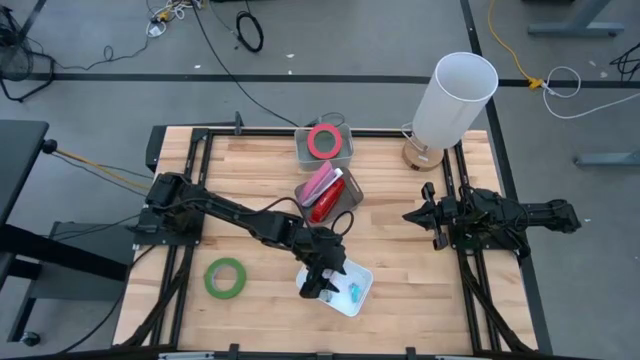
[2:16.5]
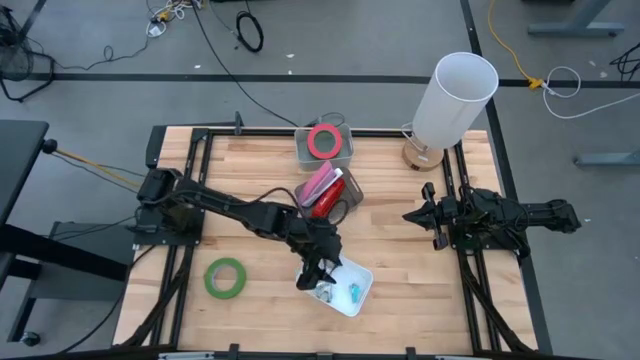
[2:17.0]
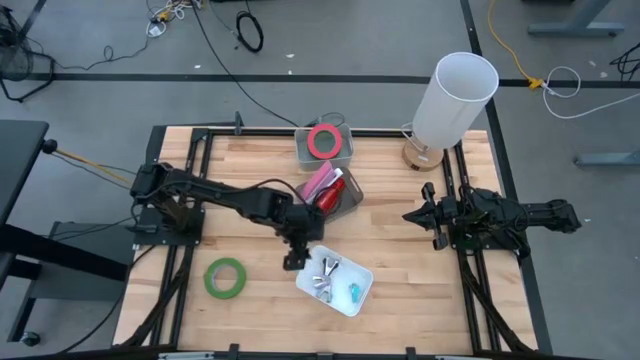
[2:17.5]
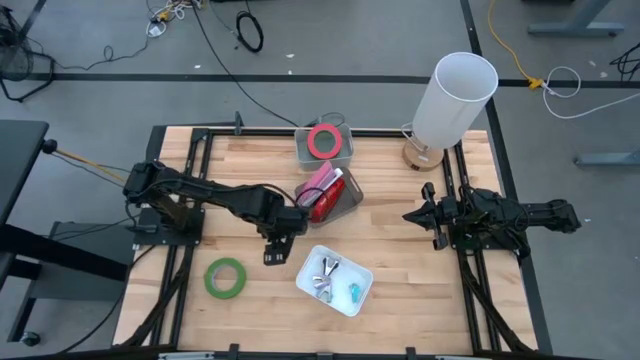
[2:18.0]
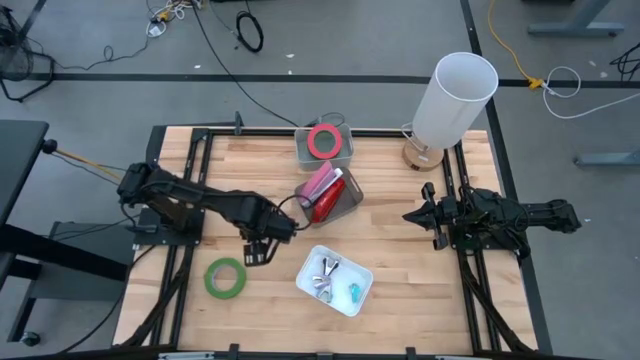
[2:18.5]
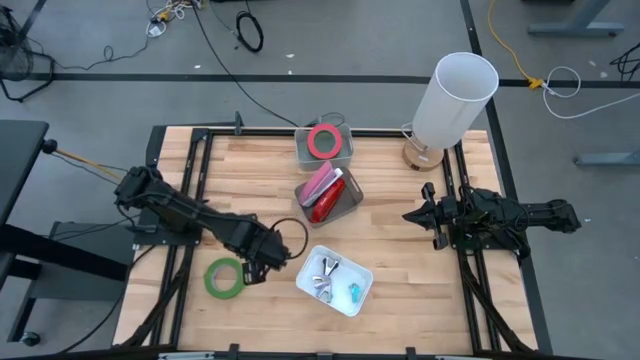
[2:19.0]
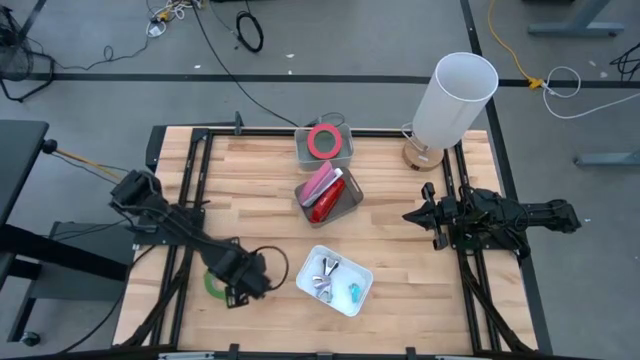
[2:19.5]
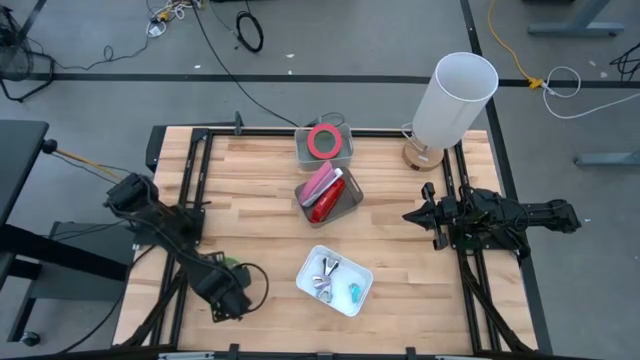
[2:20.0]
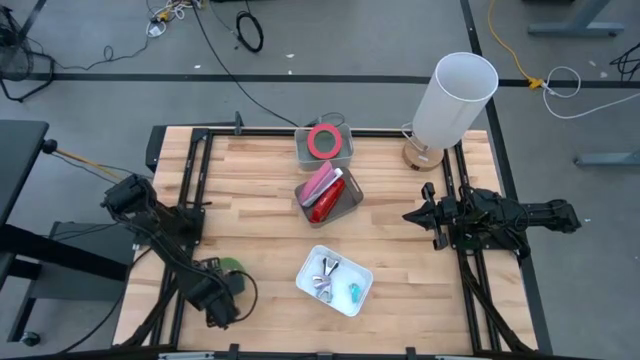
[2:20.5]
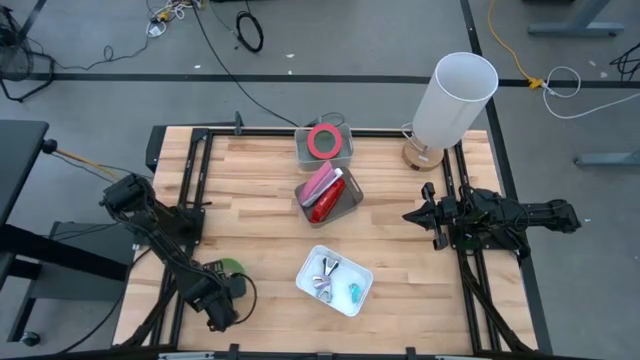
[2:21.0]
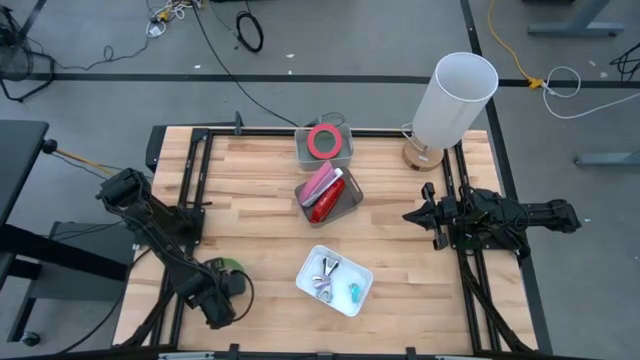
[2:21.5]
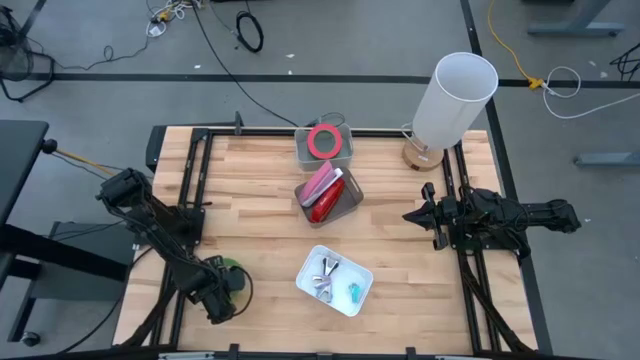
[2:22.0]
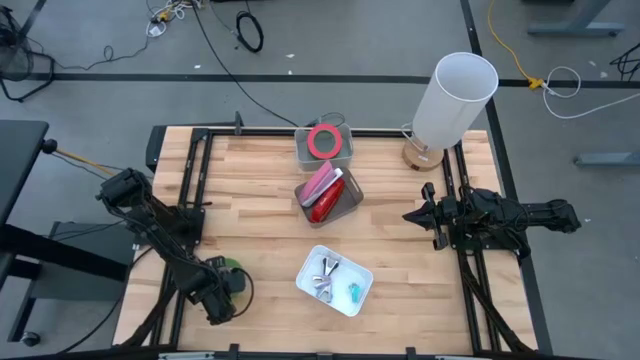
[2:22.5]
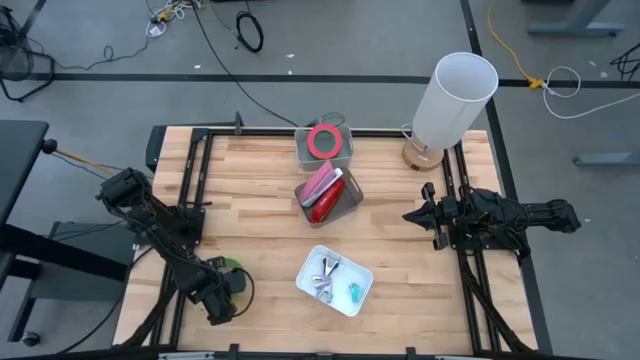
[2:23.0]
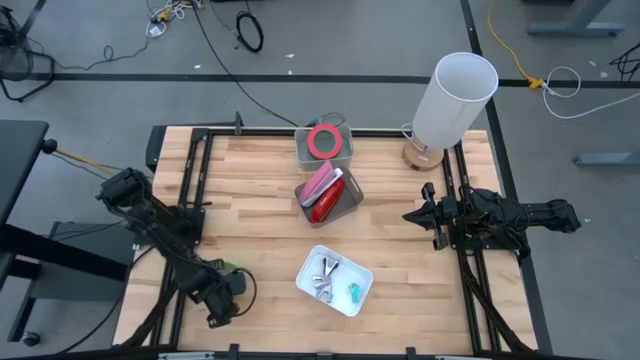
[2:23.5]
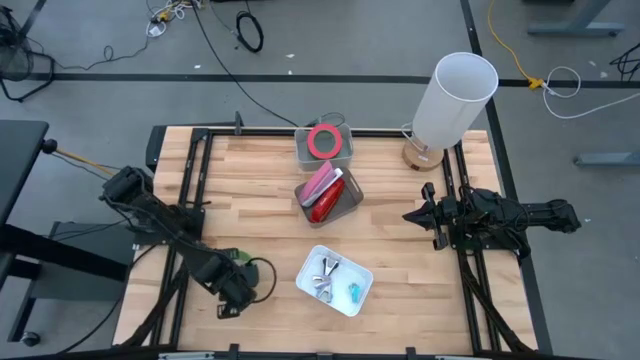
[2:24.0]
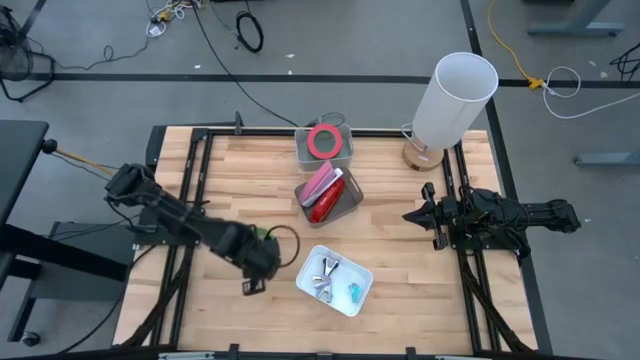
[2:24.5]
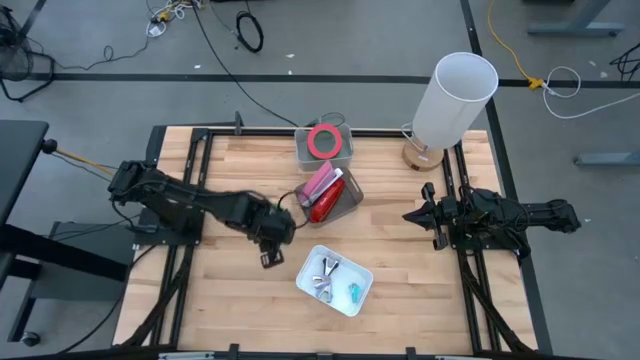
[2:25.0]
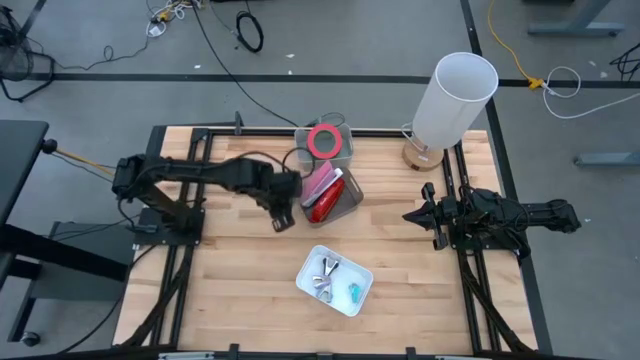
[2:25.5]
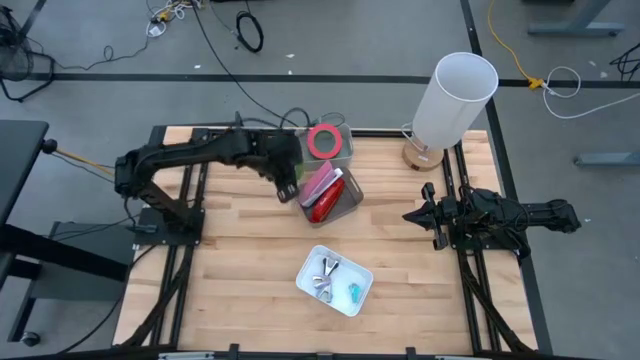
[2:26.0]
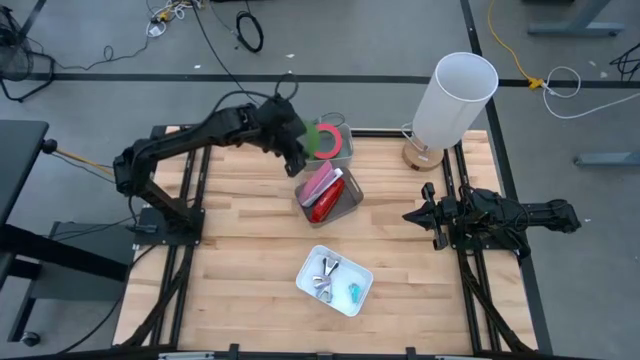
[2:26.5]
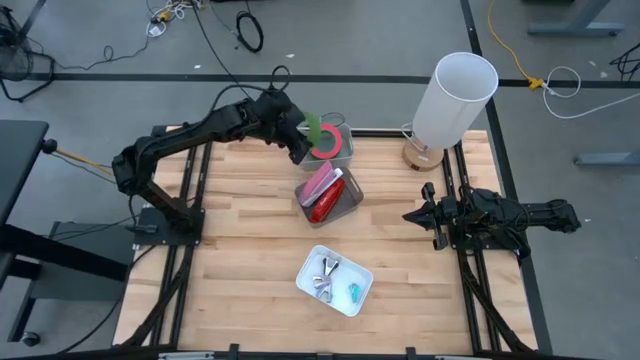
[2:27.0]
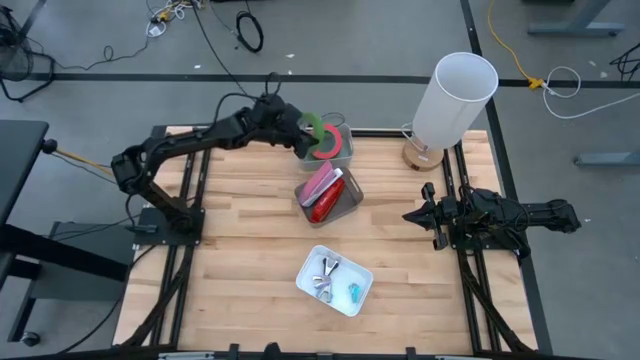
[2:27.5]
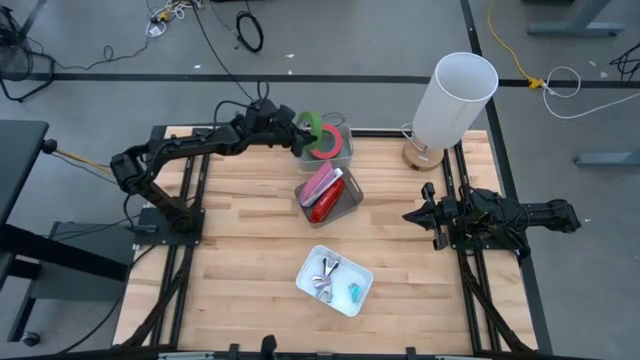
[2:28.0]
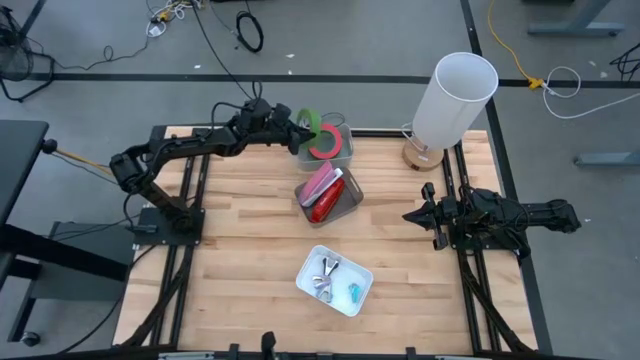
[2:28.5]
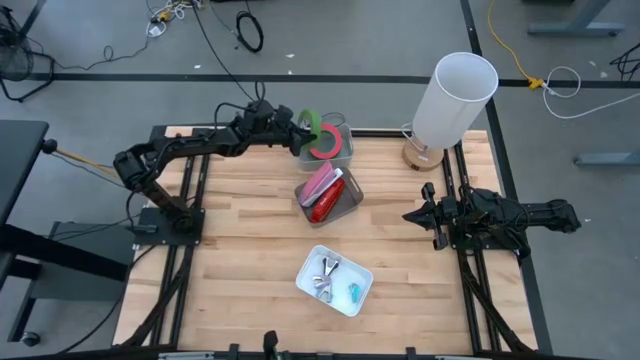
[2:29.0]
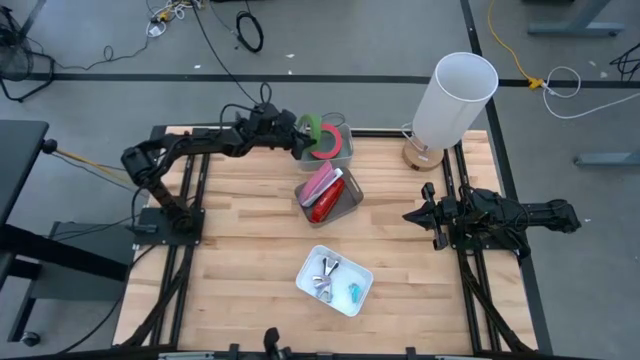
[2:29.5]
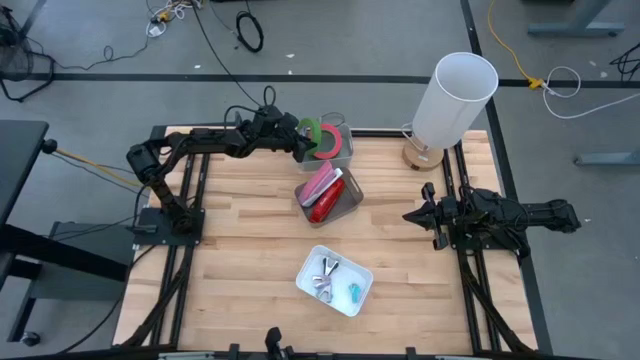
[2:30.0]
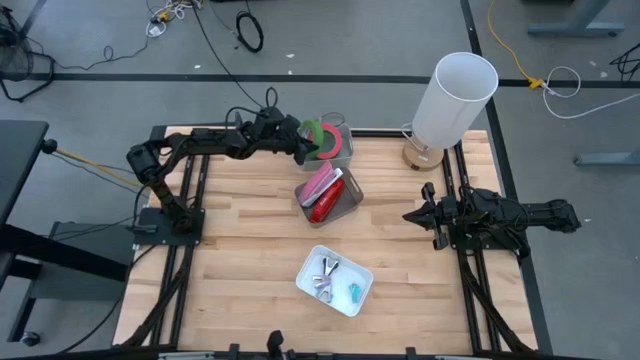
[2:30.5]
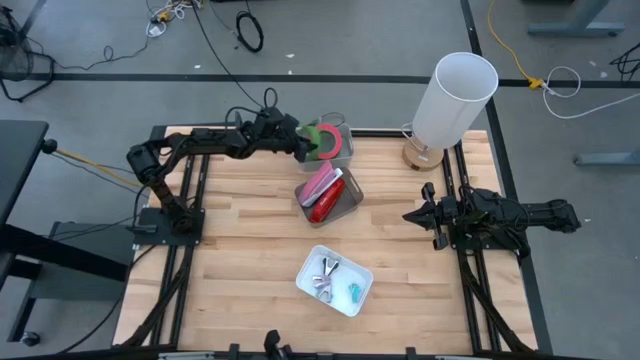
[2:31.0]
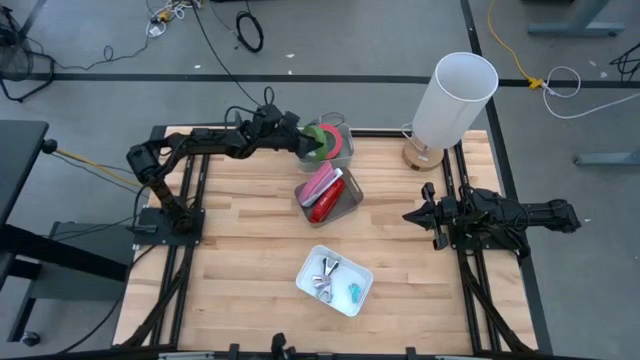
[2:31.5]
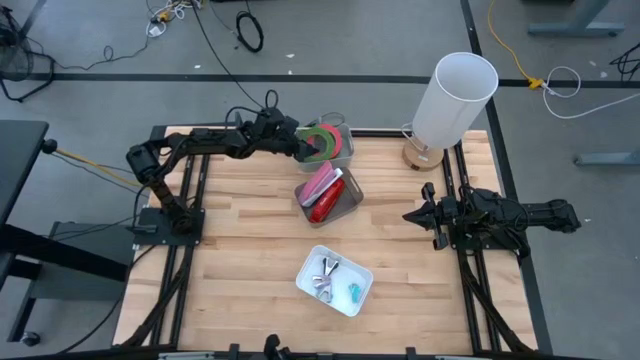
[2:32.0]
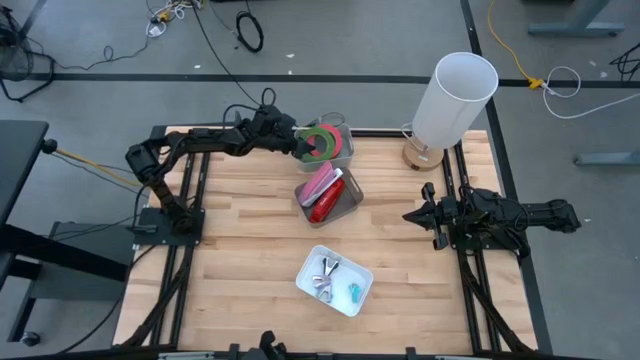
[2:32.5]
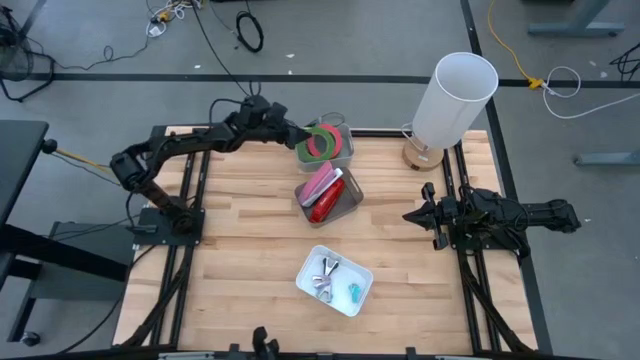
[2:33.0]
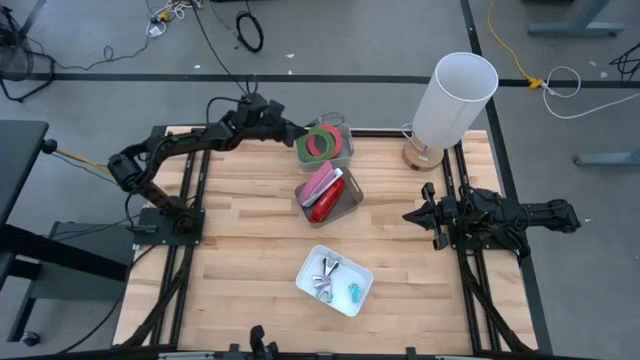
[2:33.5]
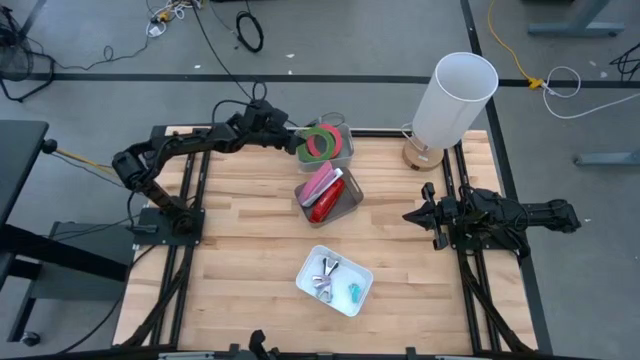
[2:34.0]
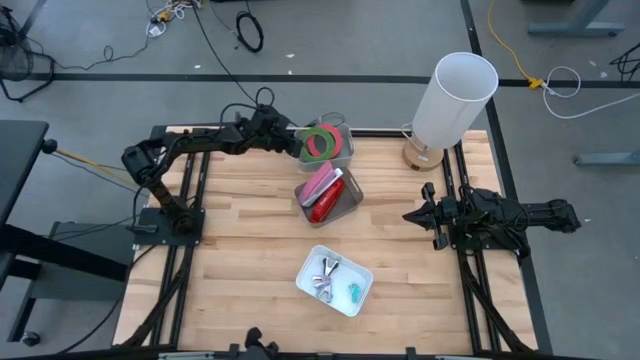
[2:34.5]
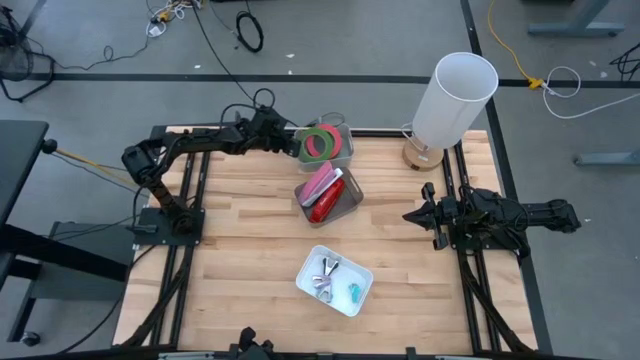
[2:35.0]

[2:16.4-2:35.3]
Task: Pick and place Stapler, Stapler remover, tape
Put the green tape into the gray bin

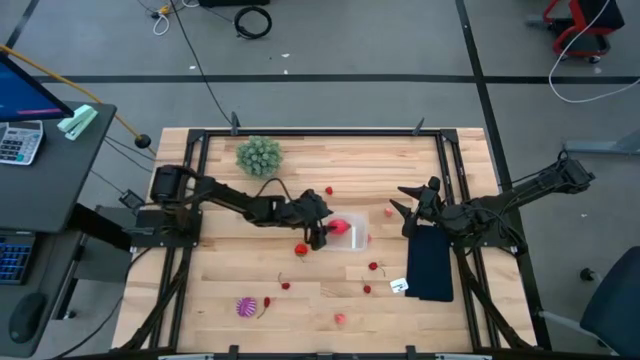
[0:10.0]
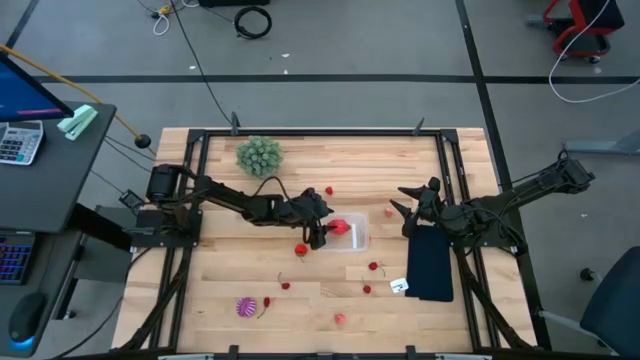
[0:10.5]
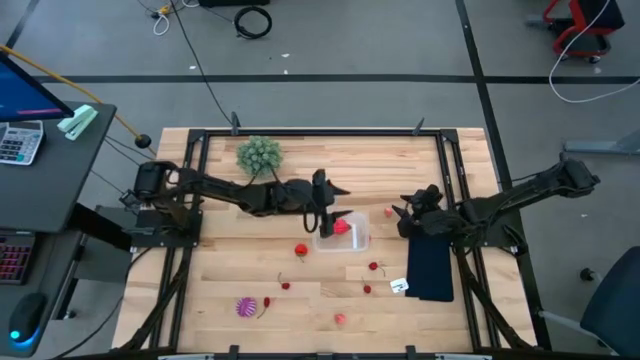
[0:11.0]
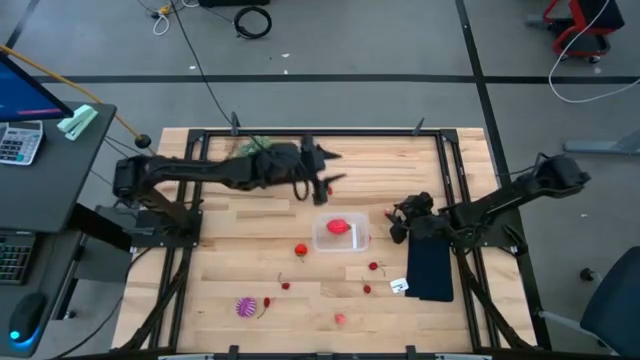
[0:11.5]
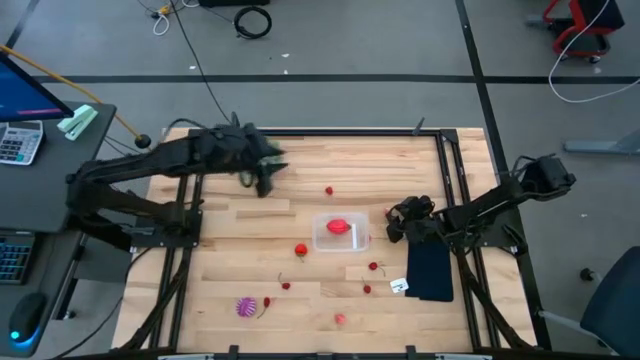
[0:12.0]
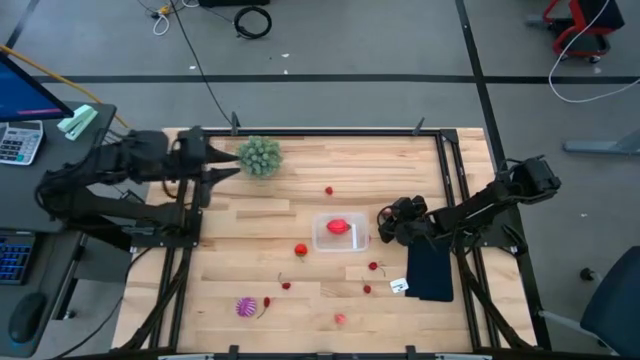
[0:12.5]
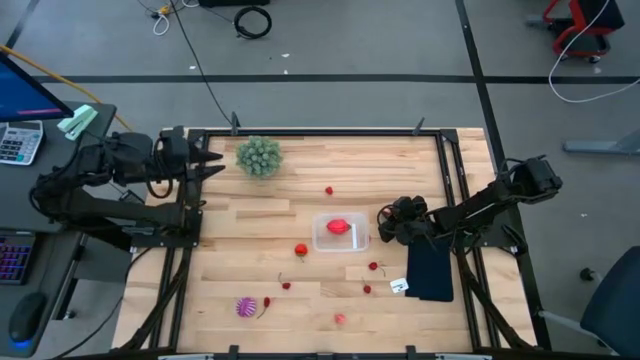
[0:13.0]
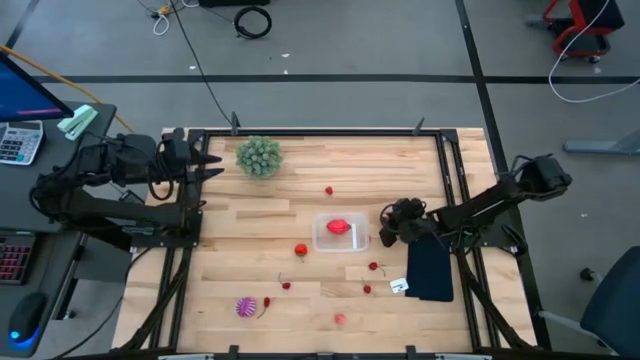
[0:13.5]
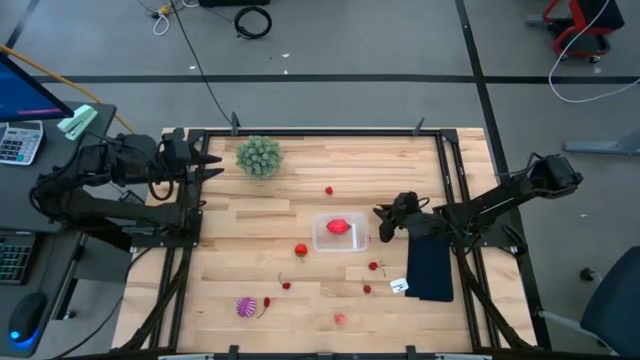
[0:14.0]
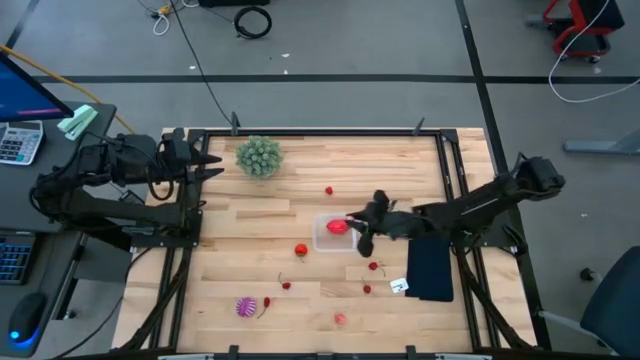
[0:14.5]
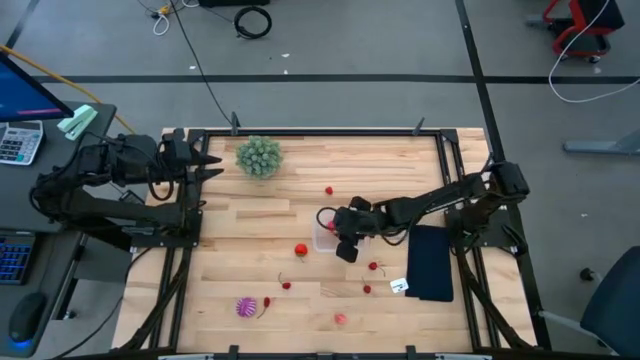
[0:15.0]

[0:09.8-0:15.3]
Task: Pick and placing Produce into tupperware
Put the pink peach into the transparent bin
